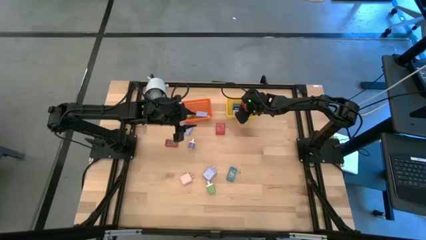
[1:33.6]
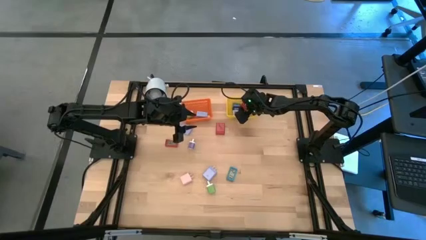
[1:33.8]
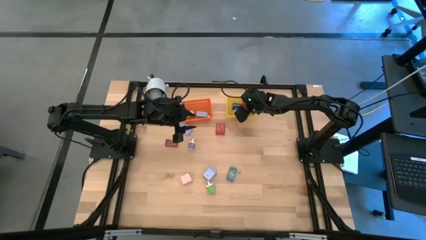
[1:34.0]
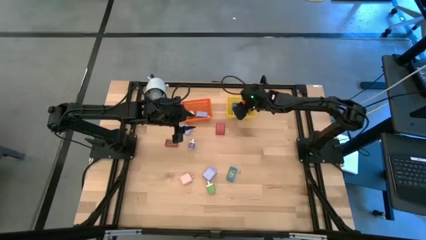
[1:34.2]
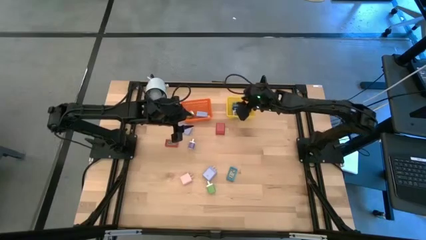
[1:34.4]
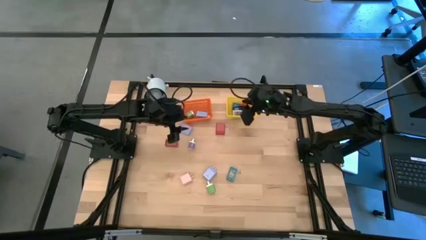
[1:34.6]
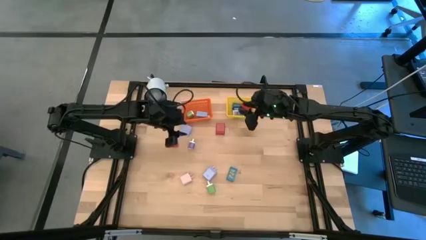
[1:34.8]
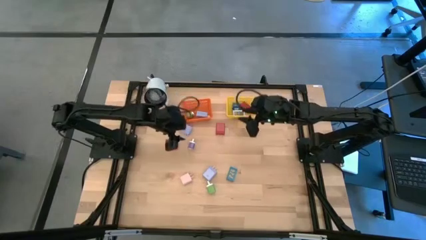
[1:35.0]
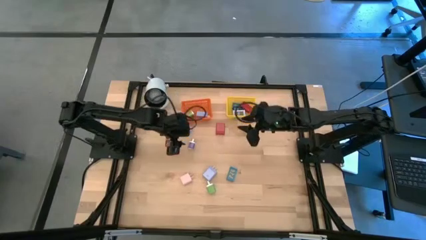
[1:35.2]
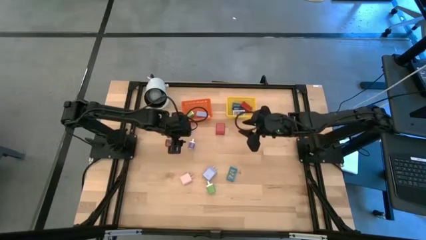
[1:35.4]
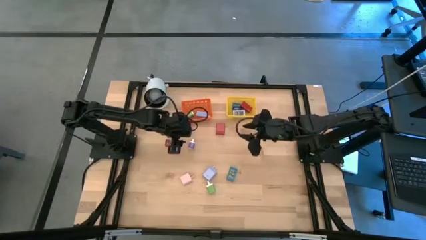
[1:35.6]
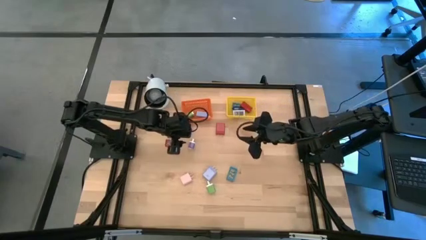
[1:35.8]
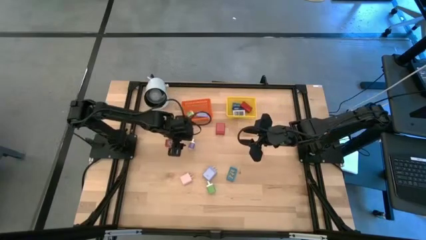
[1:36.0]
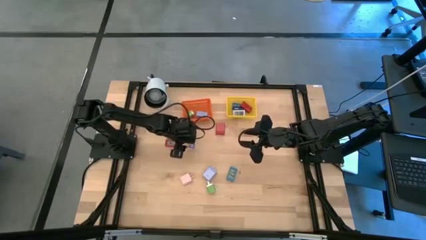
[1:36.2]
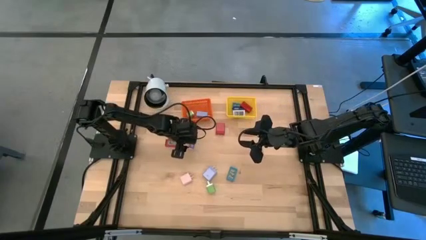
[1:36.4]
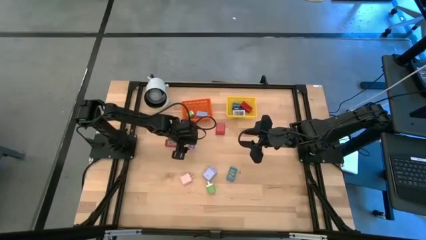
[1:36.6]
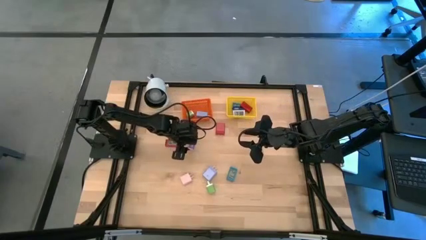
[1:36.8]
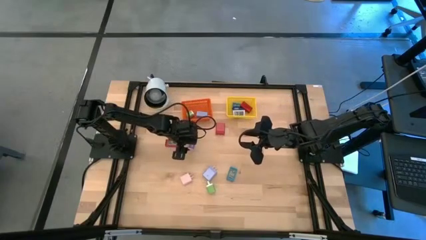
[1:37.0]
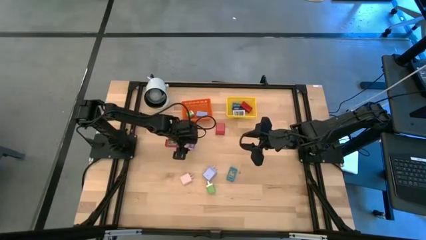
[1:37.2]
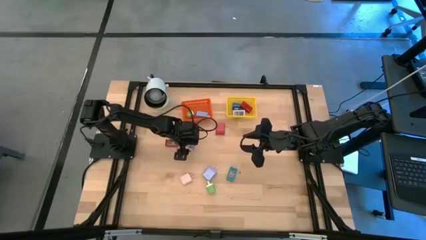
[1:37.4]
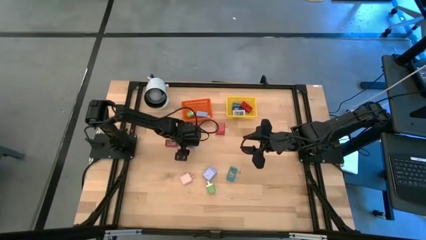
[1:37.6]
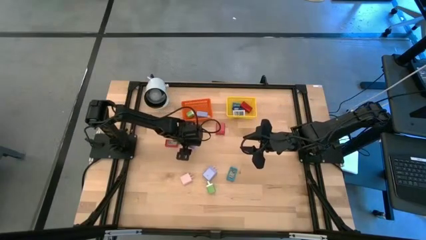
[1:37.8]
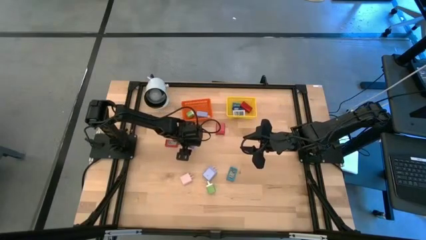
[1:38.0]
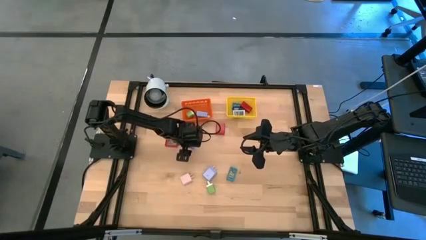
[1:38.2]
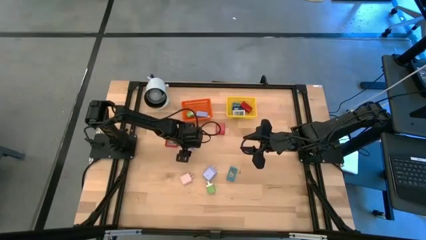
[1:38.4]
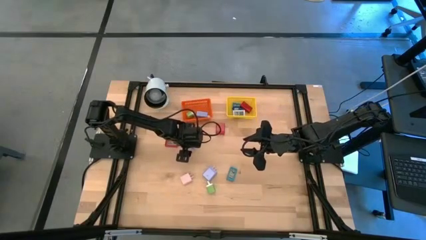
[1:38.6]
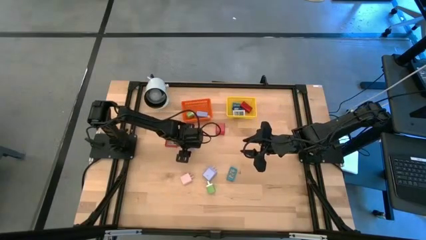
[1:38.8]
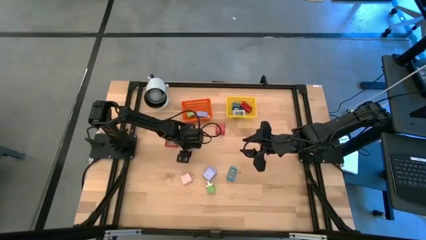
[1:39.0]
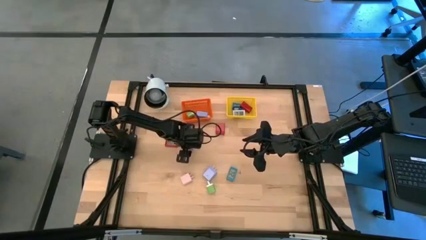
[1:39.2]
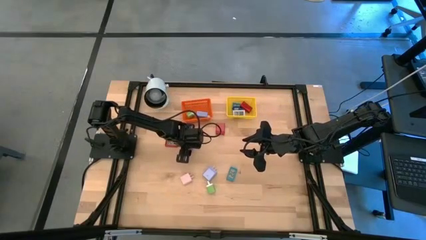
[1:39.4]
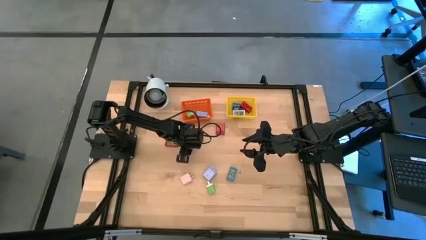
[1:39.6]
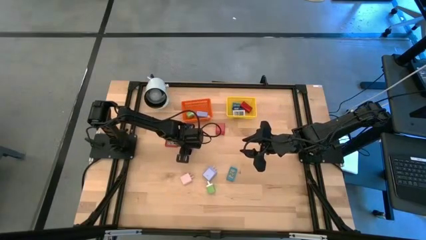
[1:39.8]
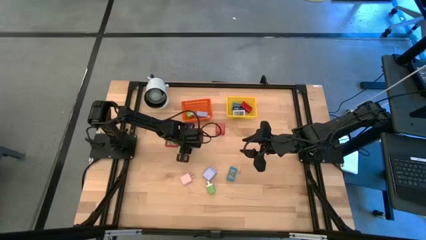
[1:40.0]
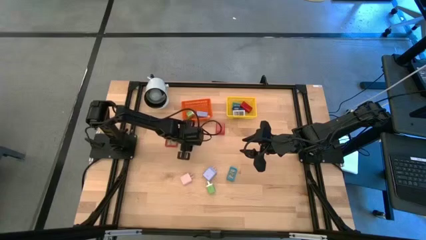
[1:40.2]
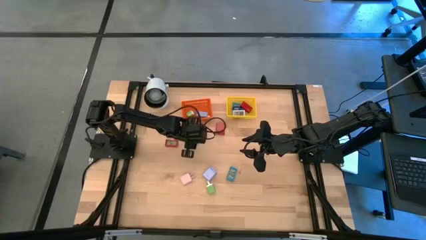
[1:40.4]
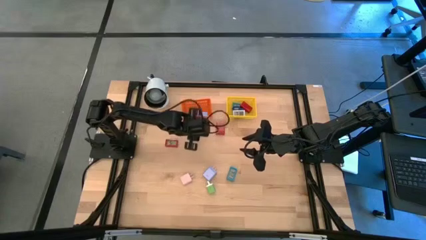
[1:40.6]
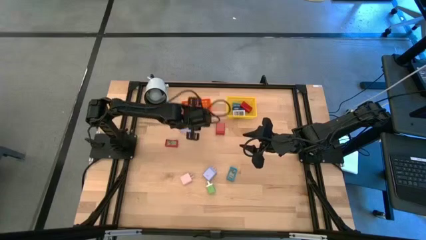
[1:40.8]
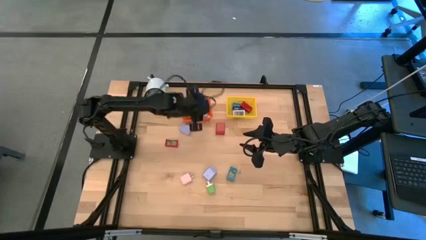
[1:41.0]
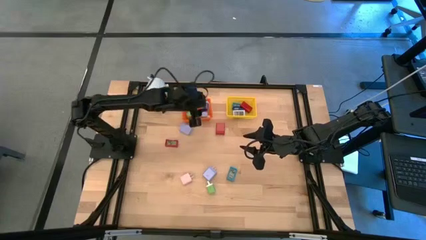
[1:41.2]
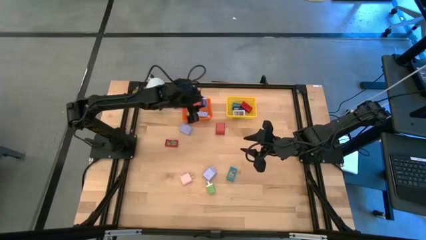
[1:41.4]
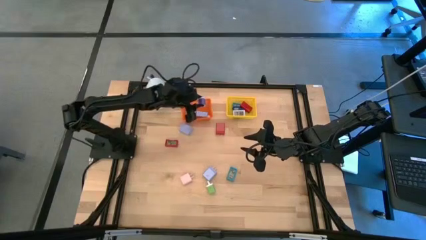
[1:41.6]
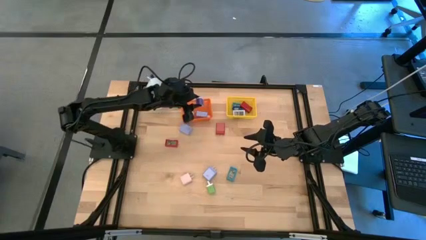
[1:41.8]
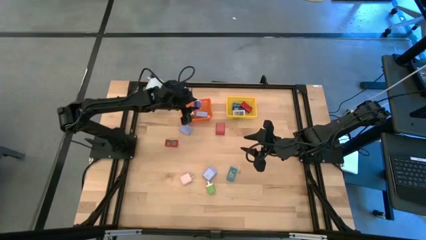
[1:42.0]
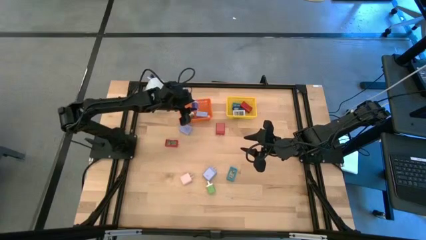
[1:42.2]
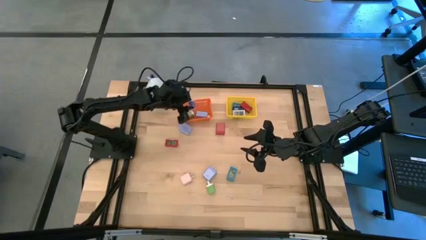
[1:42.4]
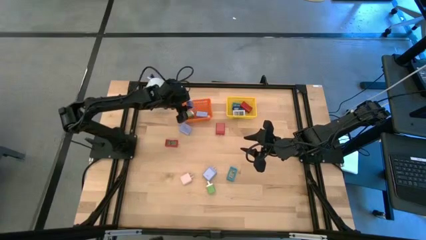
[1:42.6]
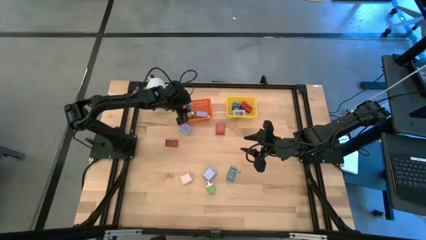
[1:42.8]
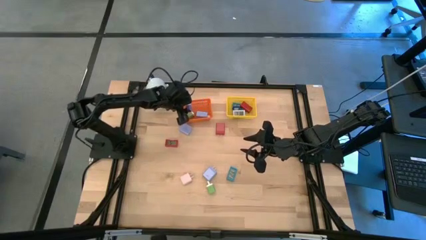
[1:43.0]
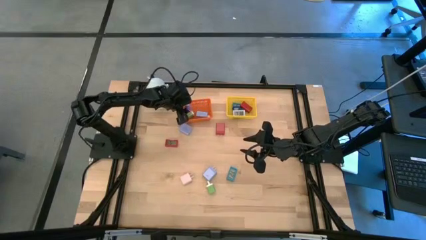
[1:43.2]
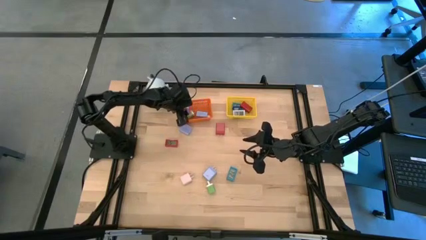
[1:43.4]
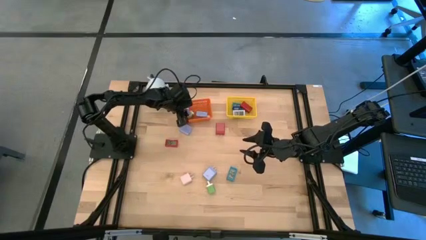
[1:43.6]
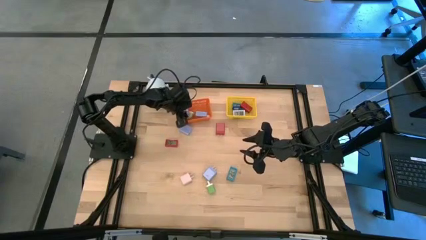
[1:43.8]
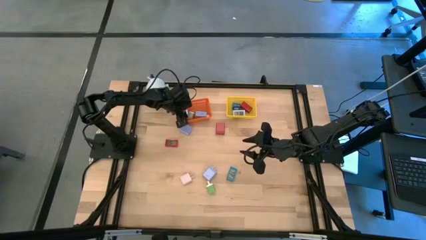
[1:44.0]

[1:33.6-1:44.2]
Task: Pick & Place Office items
Put the dark blue charger adapter into the yellow bin

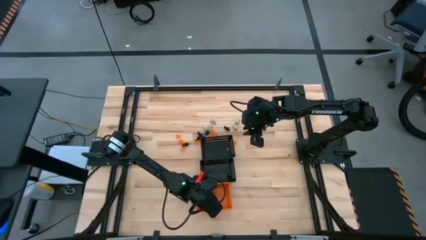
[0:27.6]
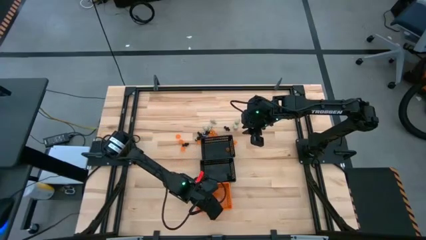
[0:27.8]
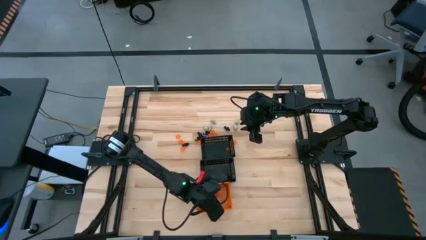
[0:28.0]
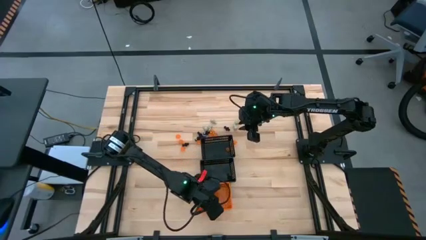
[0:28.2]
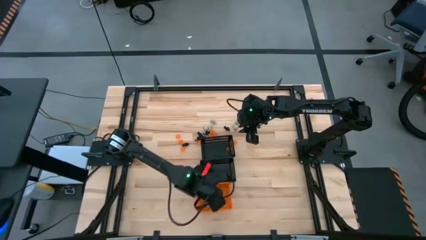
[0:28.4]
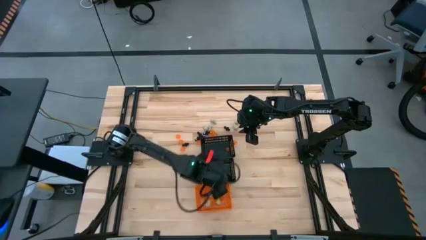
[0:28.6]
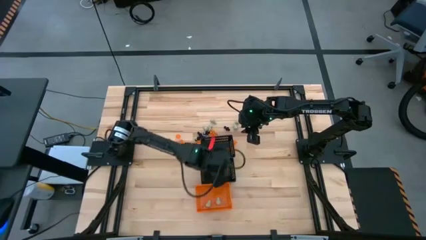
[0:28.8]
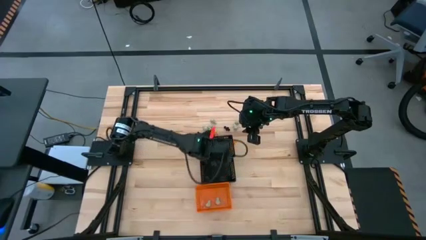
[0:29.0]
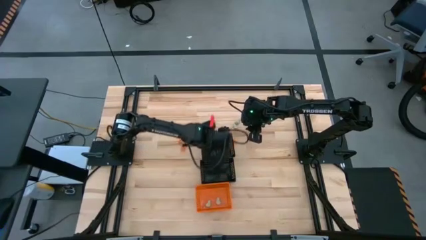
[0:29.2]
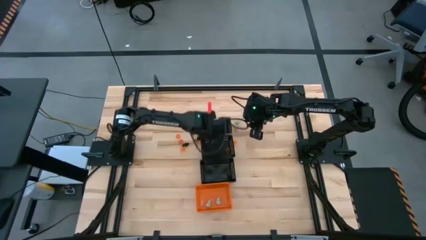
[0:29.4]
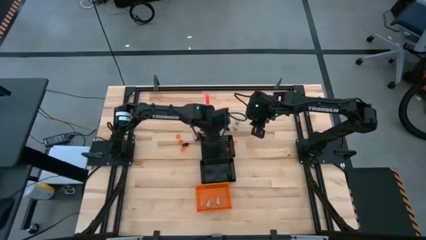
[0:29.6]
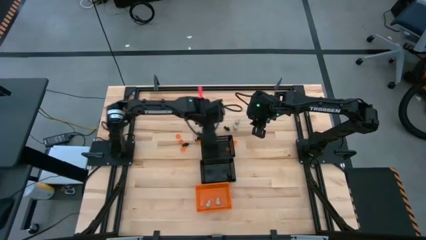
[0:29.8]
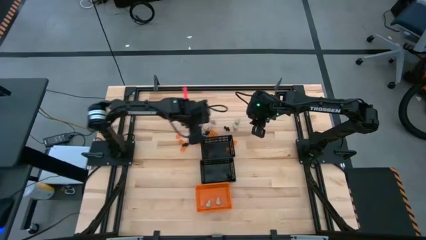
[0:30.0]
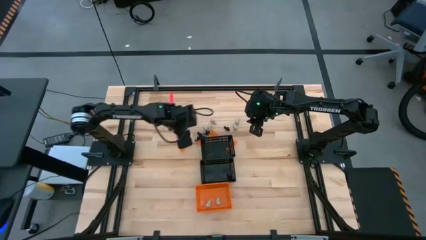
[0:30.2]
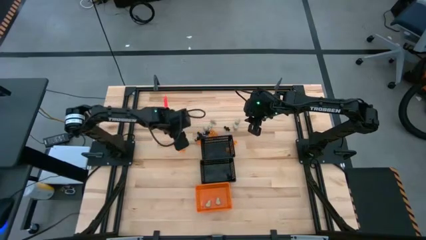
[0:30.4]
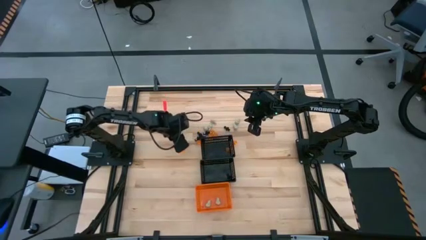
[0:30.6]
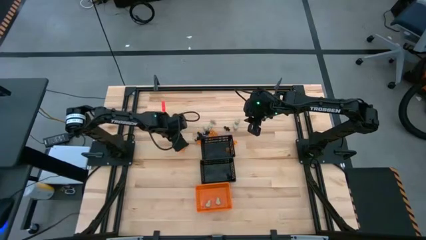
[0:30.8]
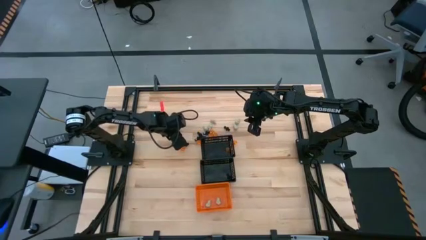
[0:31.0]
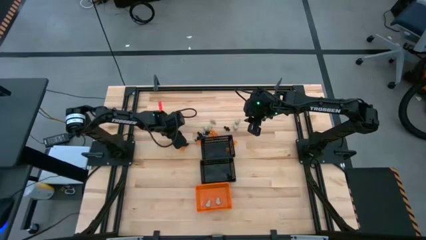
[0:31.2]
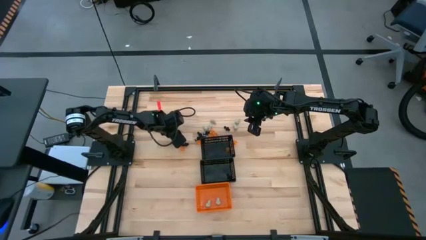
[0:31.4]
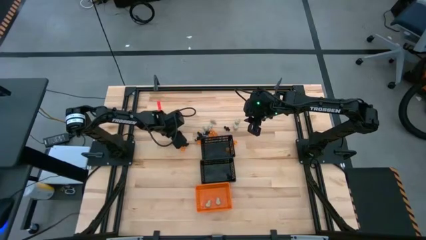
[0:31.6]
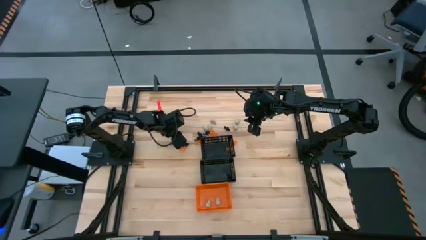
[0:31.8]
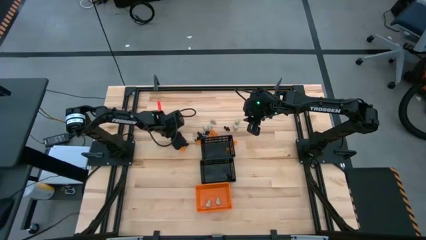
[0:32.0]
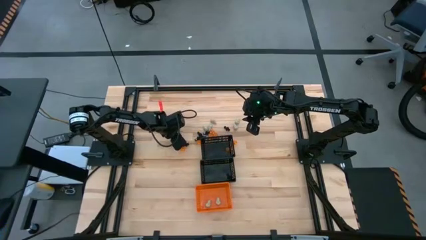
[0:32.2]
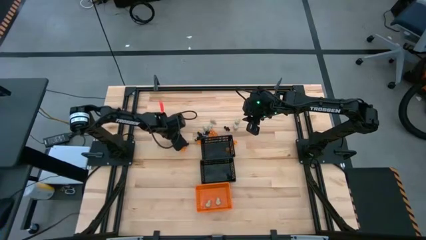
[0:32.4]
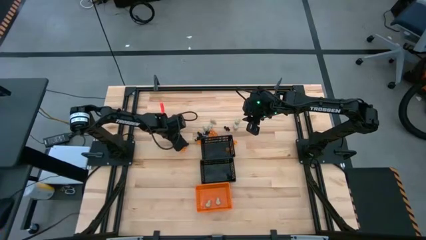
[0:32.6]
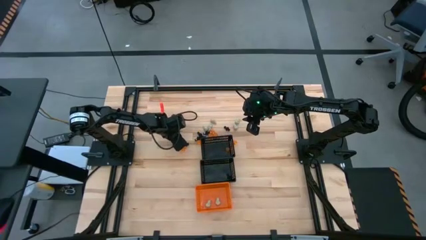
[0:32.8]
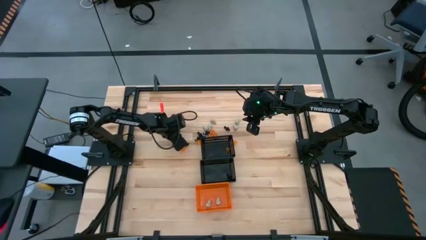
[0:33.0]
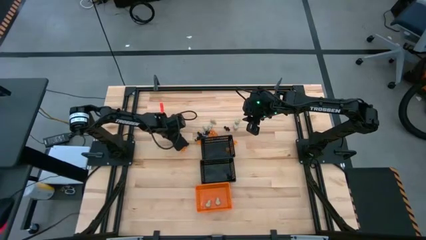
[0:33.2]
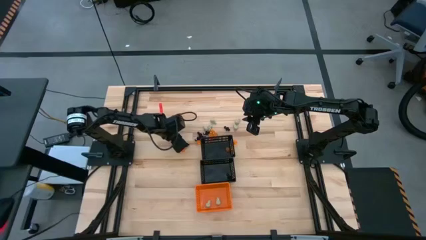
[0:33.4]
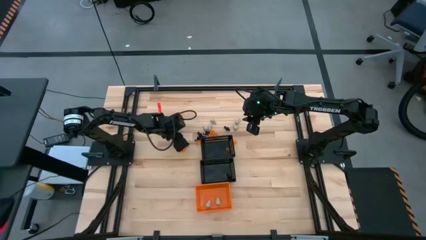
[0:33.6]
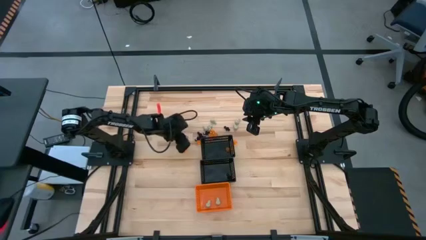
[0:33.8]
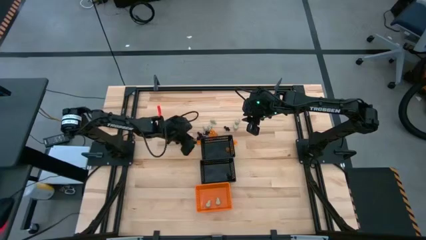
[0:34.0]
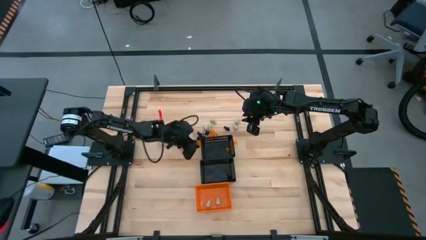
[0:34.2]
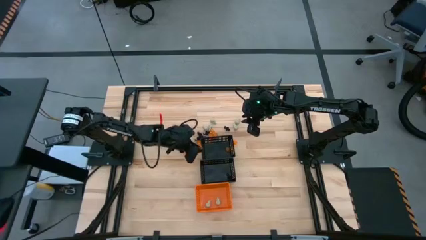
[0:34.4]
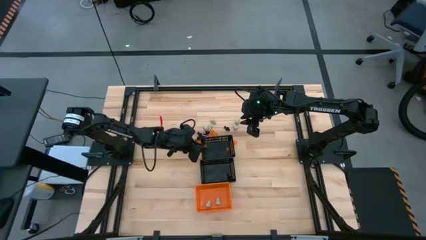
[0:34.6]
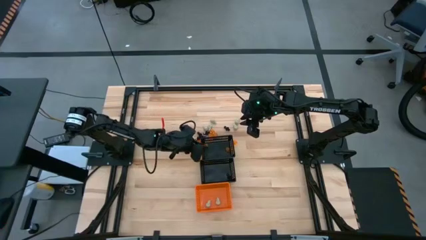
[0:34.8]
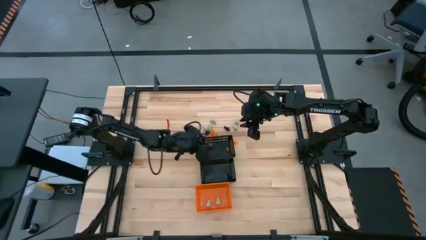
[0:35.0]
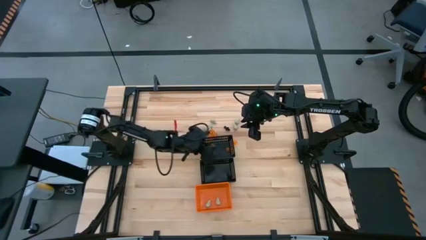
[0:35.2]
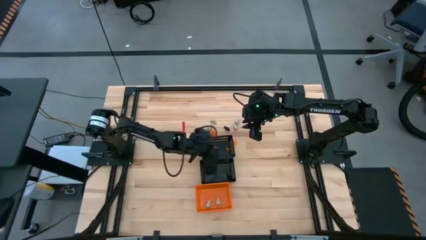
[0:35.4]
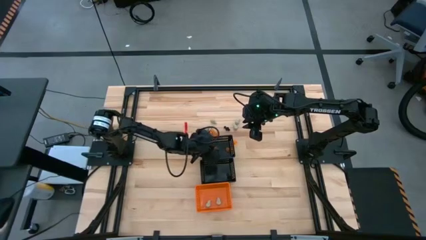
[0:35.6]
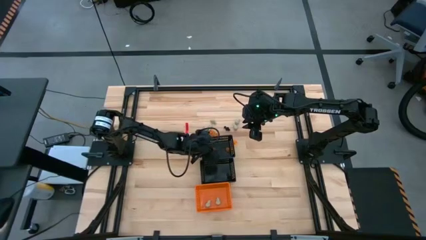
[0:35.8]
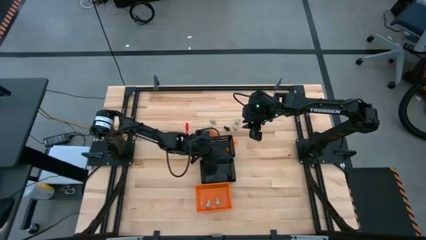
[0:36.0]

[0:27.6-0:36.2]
Task: Sort Halloween decoration
Put the orange pumpkin toy into the top black bin
